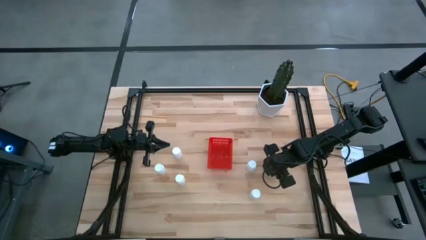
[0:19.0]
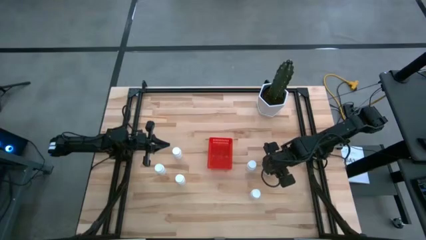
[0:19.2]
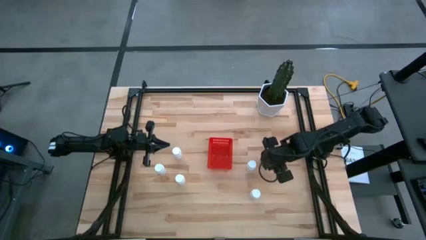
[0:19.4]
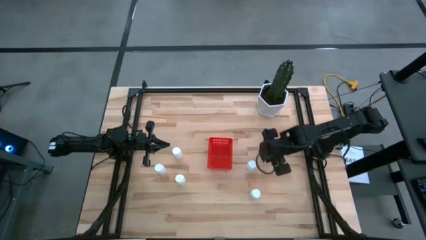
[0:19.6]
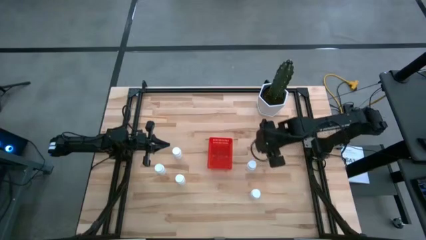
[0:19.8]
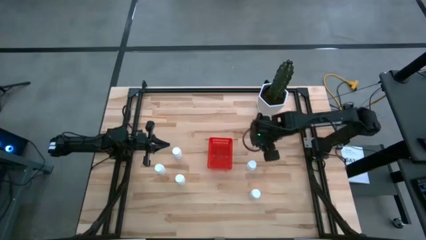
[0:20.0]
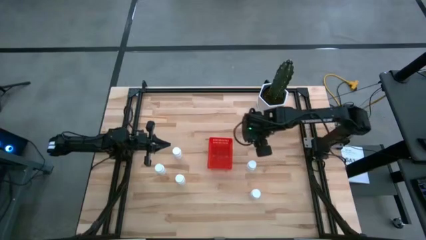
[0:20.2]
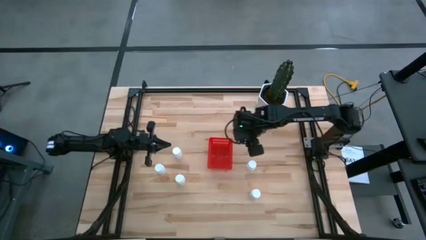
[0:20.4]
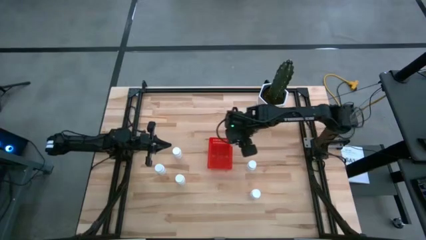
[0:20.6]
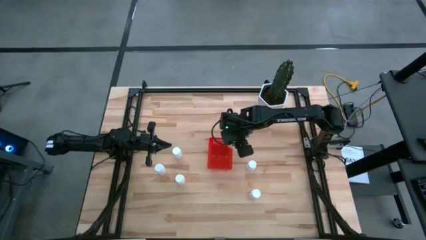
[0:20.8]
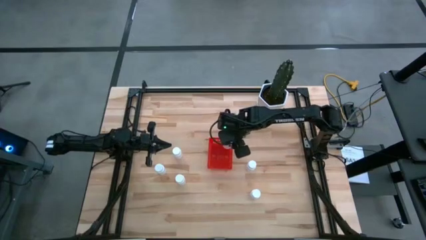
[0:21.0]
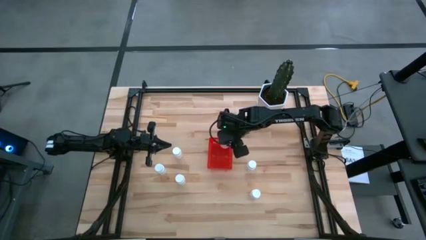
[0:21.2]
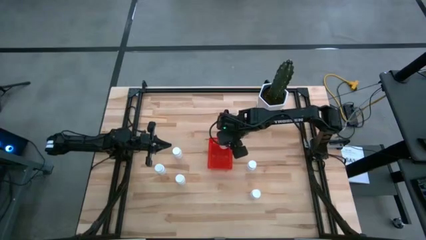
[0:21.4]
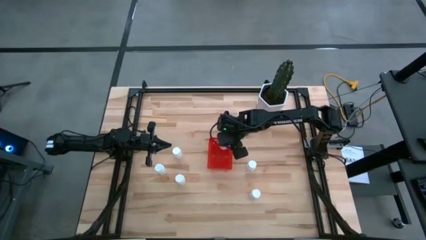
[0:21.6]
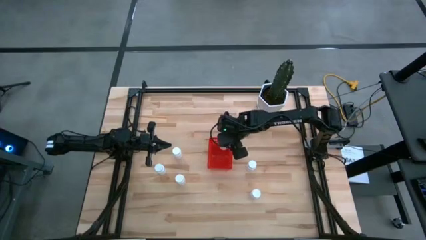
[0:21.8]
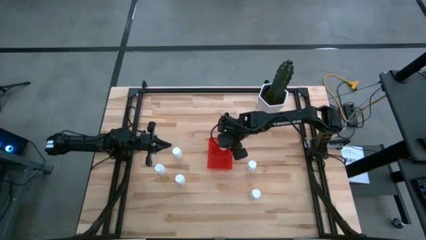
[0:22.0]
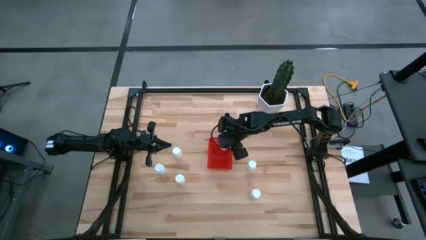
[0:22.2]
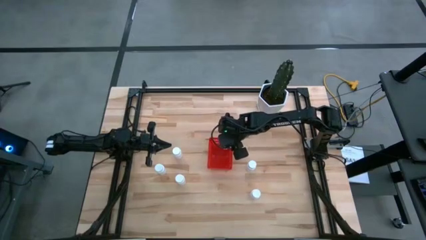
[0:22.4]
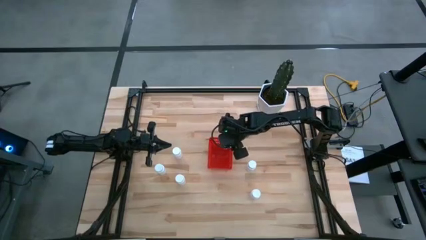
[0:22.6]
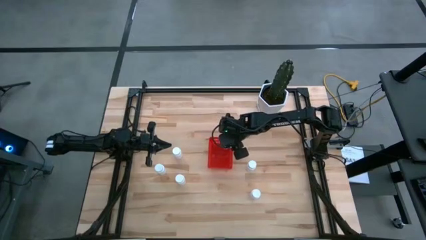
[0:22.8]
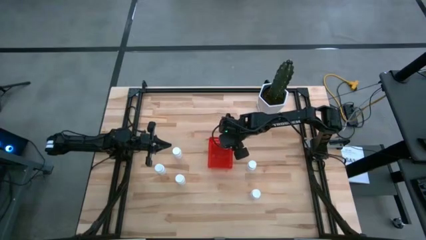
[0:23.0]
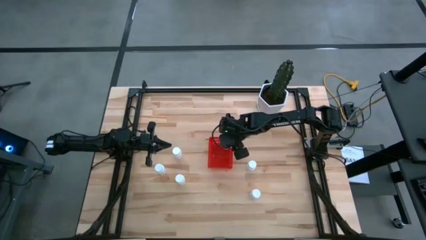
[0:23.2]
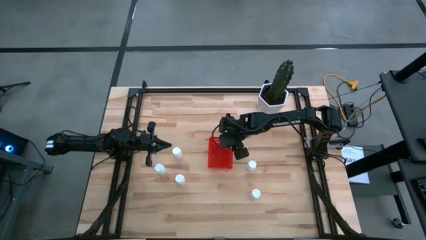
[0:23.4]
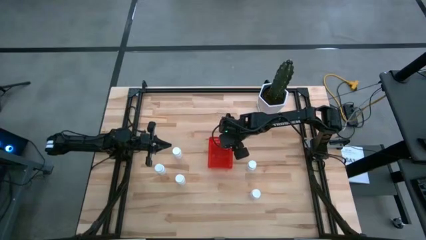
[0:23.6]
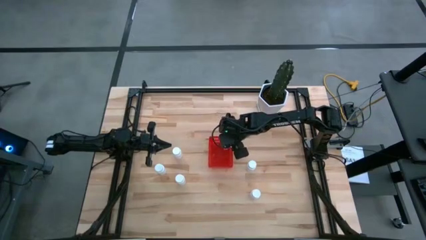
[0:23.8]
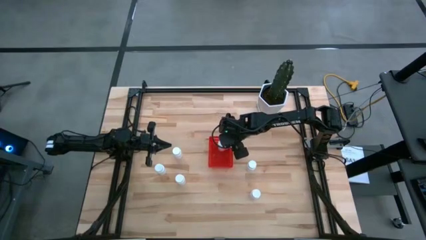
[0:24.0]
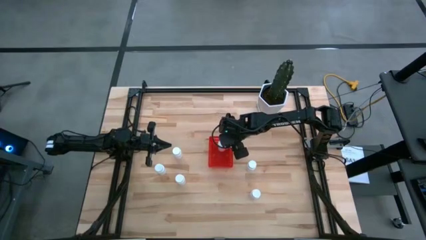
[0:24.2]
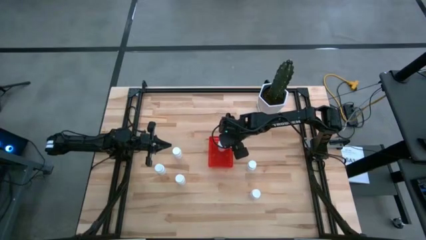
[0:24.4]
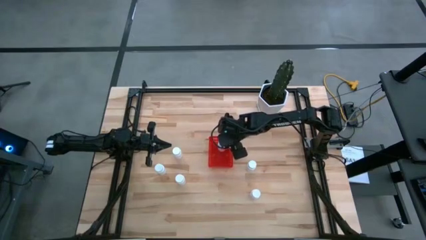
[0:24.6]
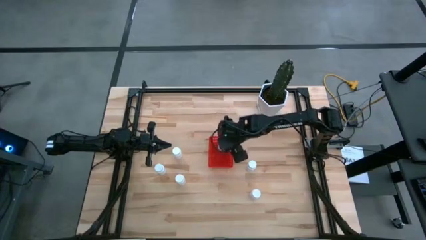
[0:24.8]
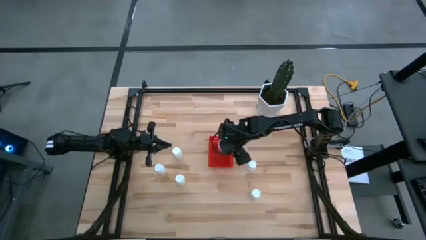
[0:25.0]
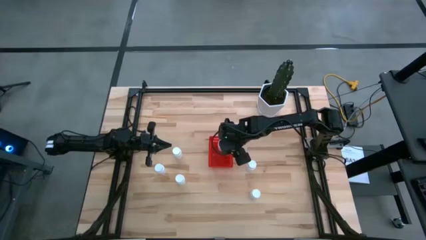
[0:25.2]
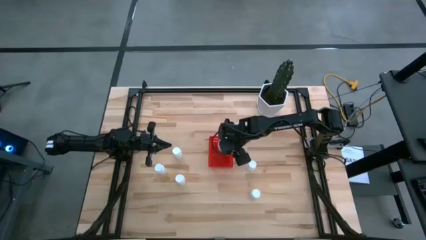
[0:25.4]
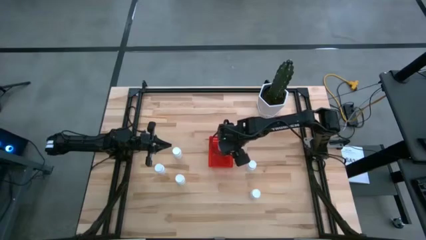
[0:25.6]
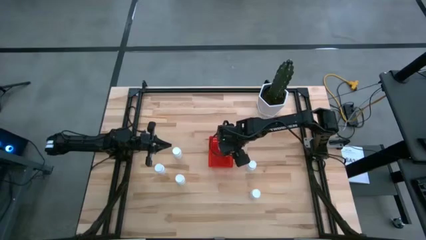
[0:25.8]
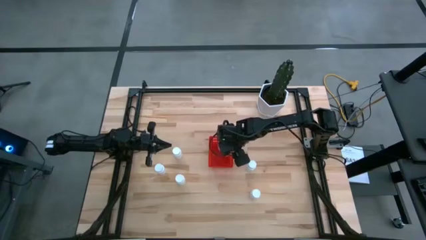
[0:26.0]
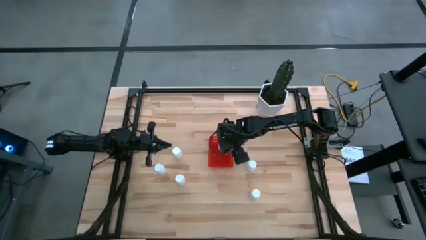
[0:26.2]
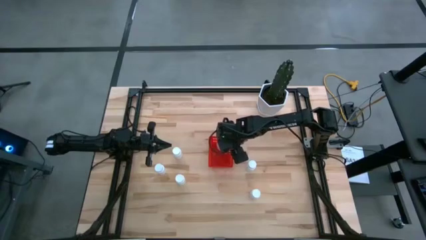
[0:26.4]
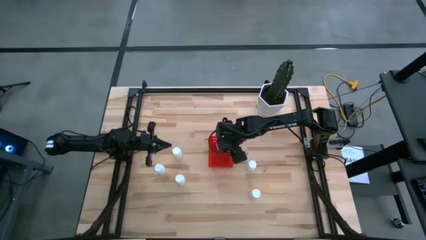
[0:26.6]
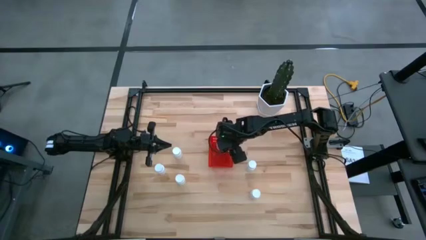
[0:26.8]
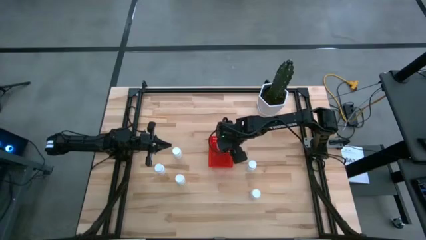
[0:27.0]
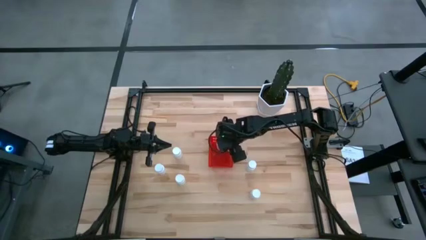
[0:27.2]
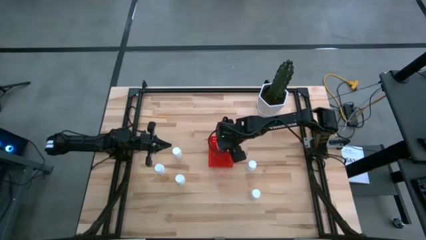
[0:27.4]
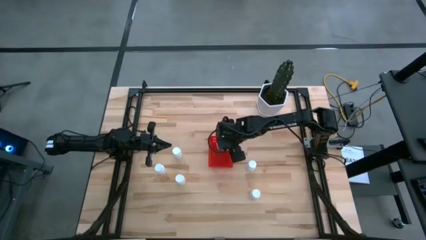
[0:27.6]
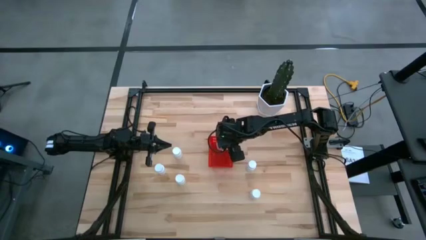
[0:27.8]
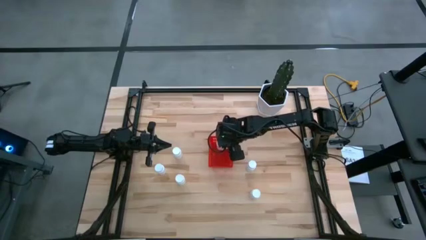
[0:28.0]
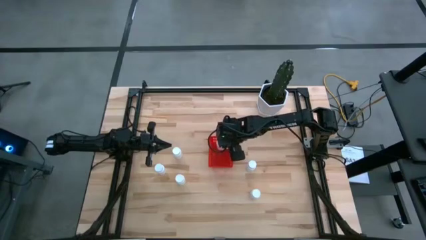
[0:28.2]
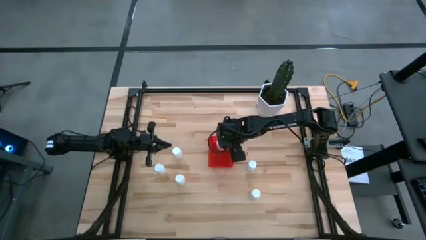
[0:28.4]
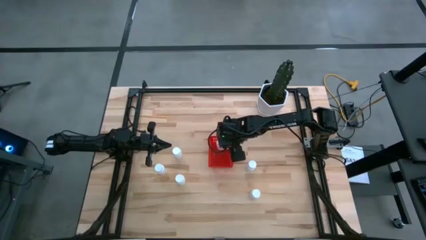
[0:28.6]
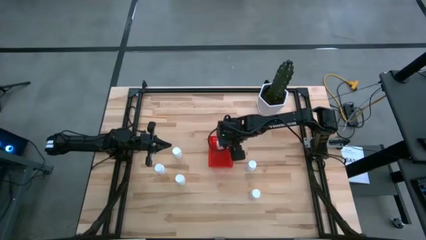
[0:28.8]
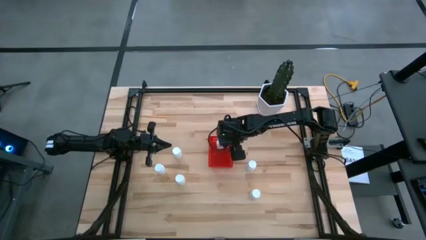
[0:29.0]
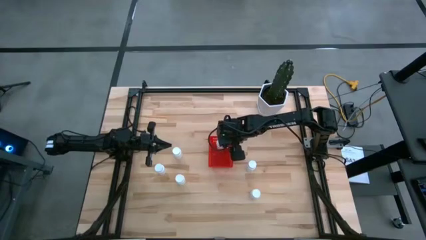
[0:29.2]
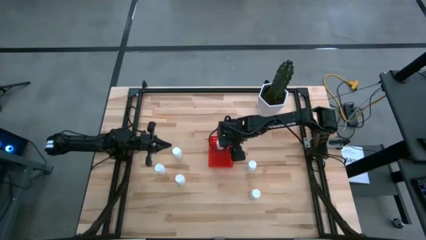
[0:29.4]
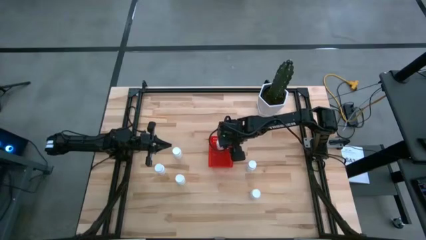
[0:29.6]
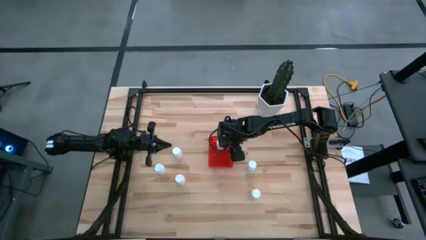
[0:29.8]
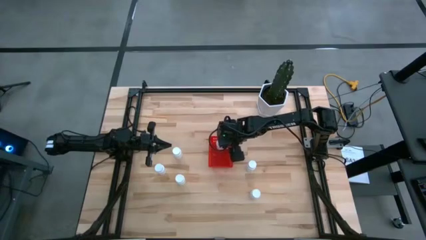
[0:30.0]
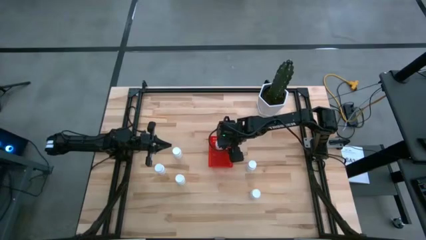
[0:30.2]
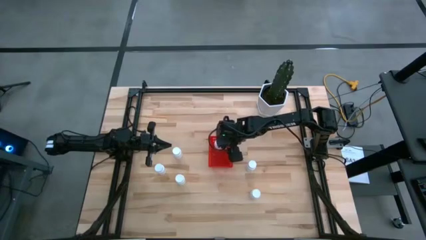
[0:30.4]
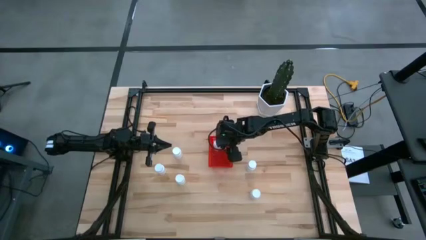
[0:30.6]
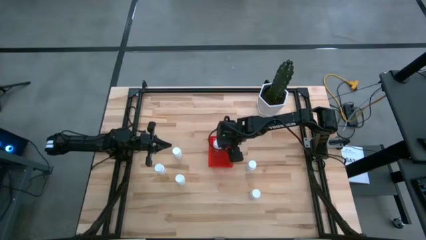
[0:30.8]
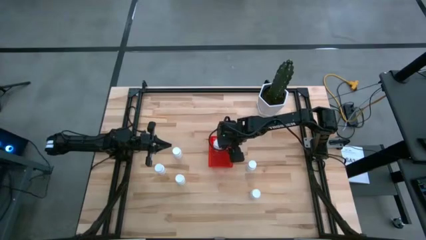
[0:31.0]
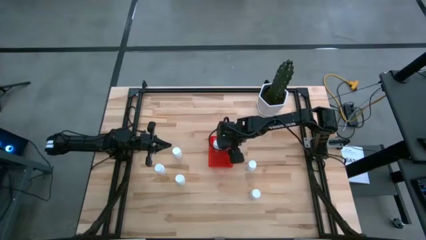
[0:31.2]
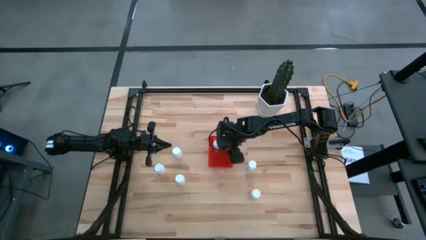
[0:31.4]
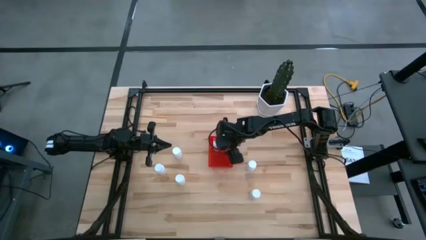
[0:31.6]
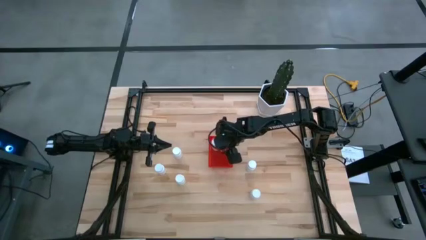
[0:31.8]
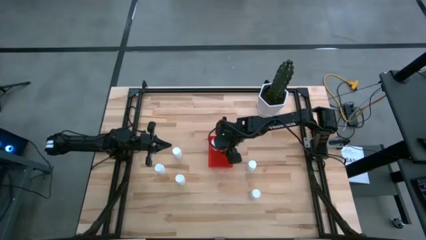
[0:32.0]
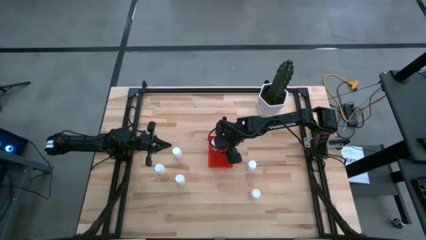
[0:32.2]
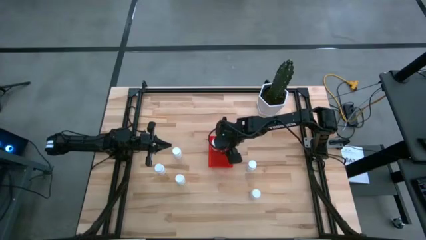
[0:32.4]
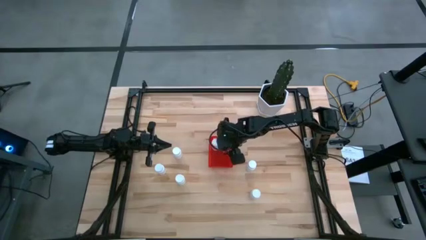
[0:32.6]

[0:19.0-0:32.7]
Task: Pick and place pill bottles into a basket
Put the white pill bottle into the red bin
